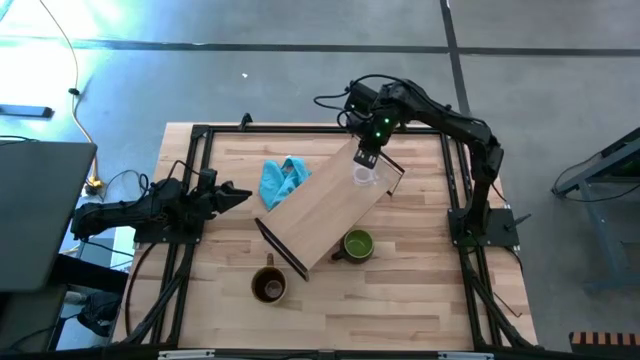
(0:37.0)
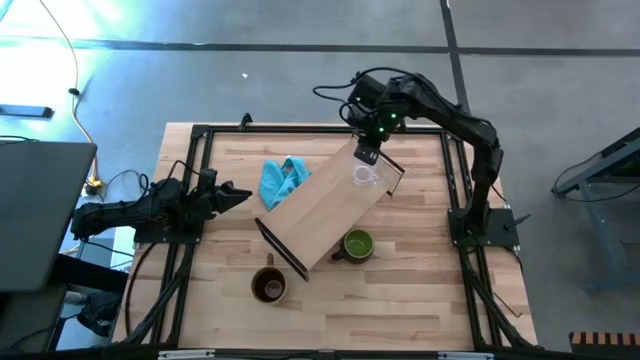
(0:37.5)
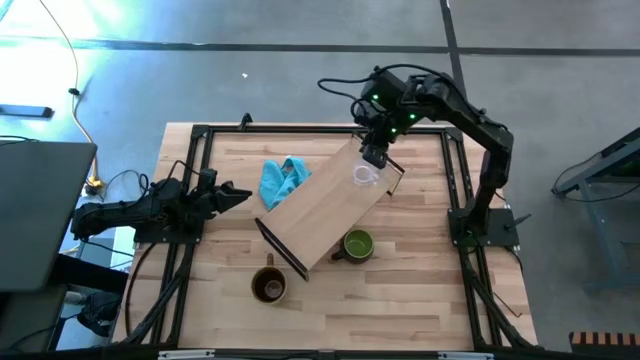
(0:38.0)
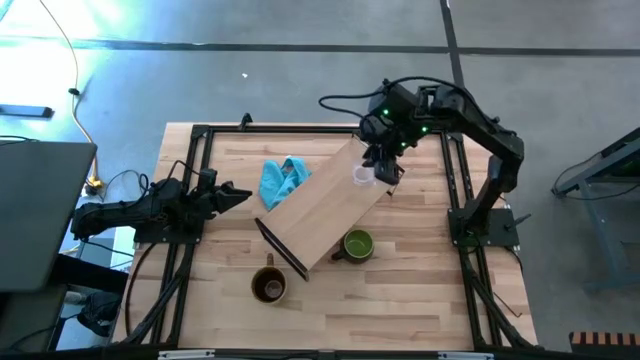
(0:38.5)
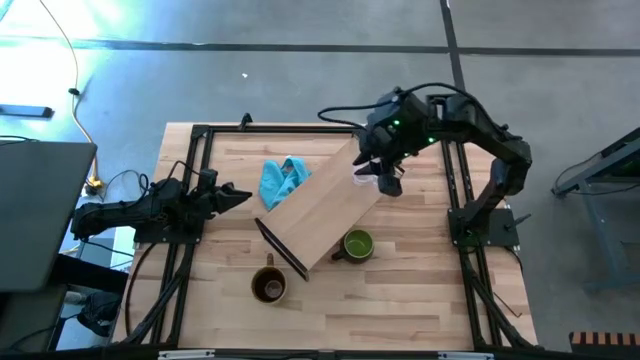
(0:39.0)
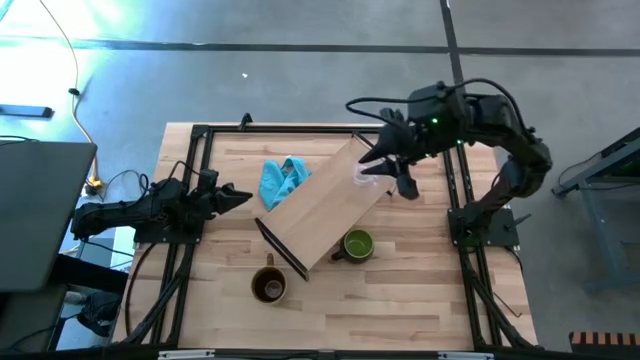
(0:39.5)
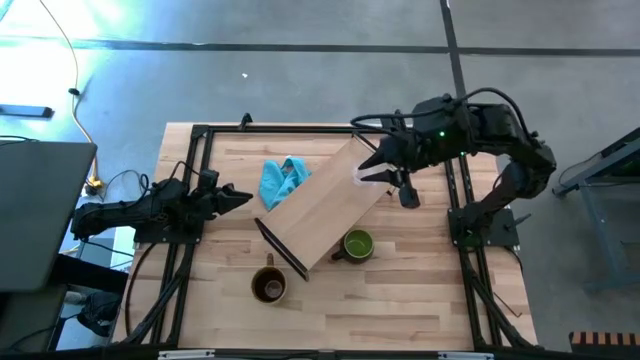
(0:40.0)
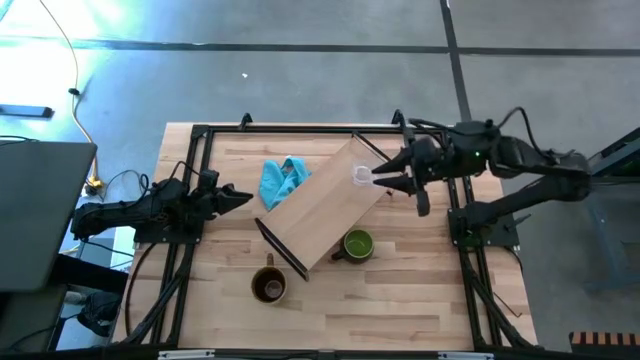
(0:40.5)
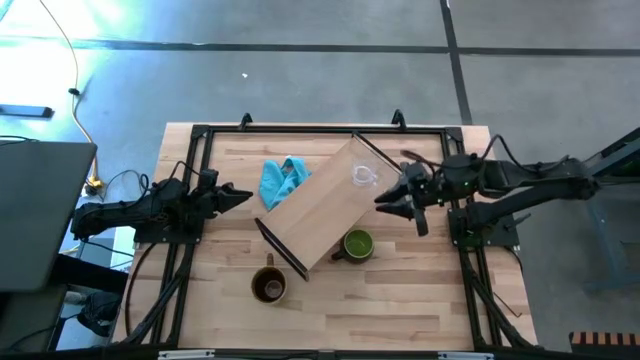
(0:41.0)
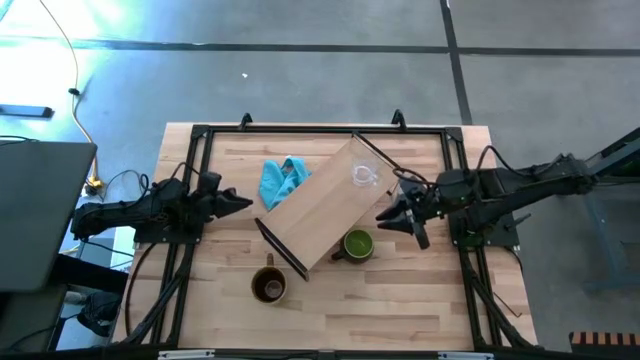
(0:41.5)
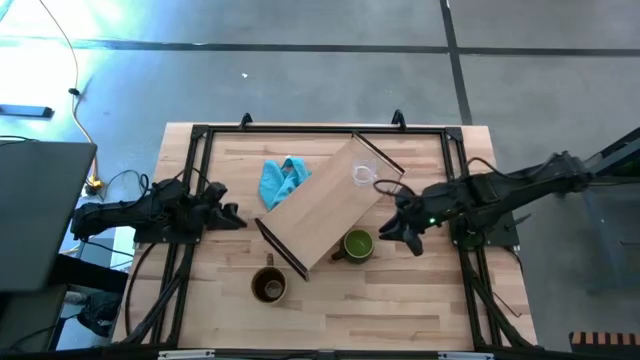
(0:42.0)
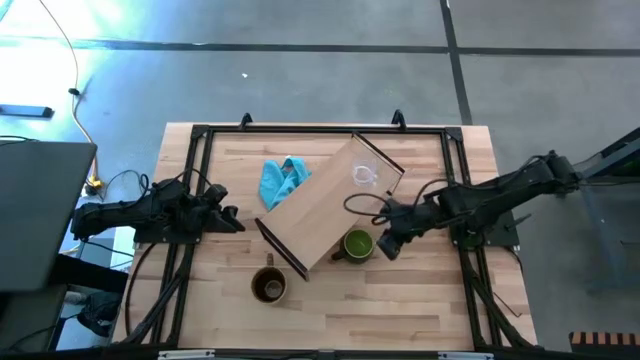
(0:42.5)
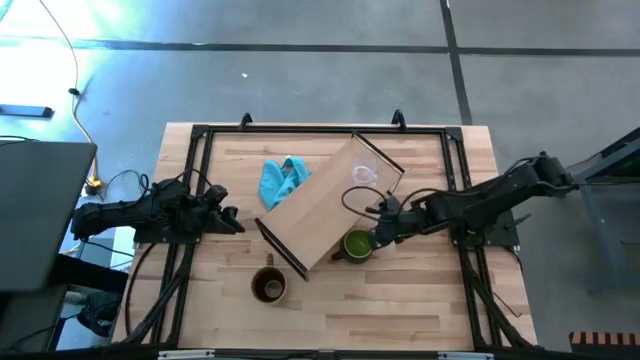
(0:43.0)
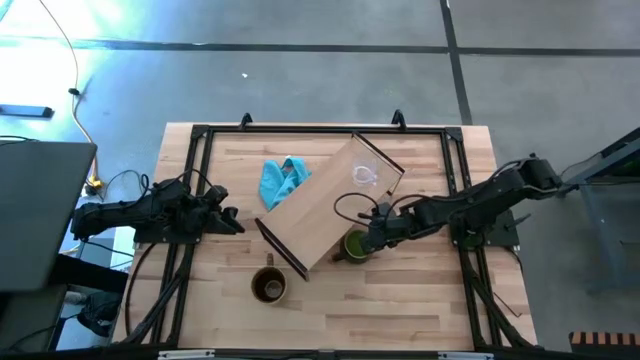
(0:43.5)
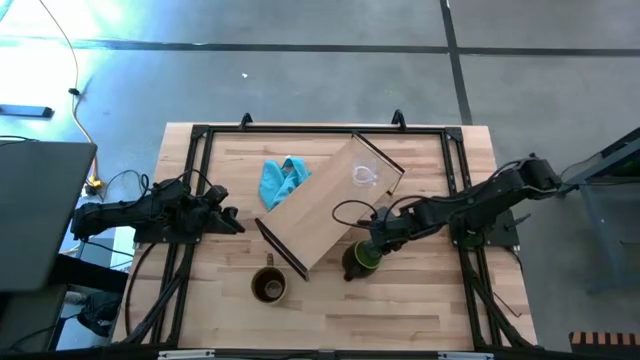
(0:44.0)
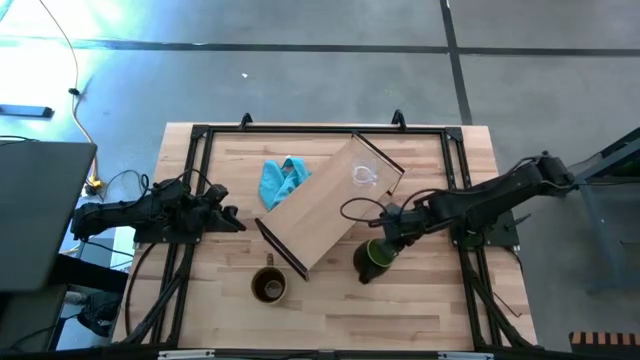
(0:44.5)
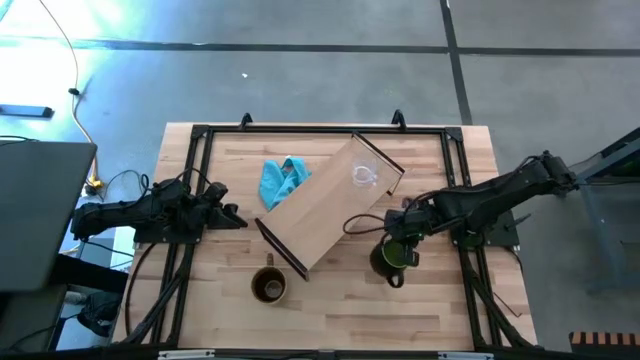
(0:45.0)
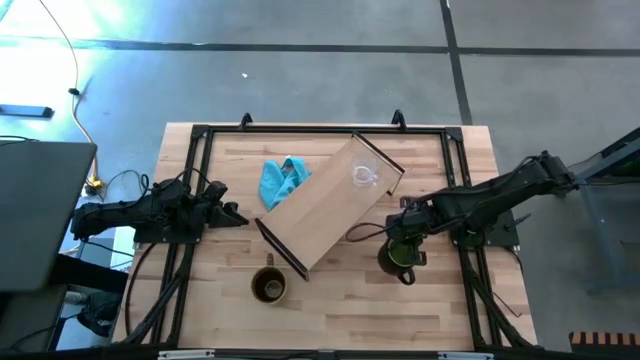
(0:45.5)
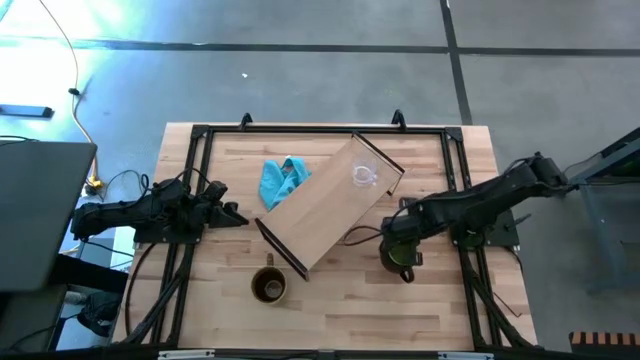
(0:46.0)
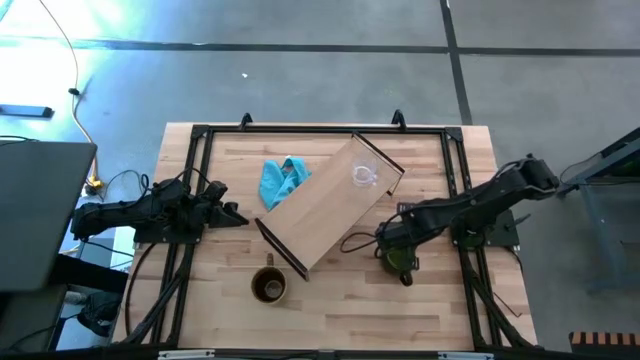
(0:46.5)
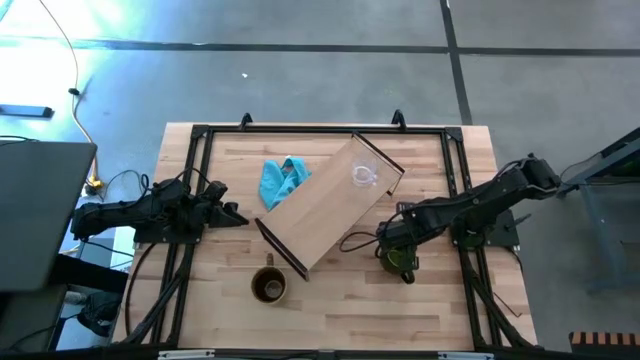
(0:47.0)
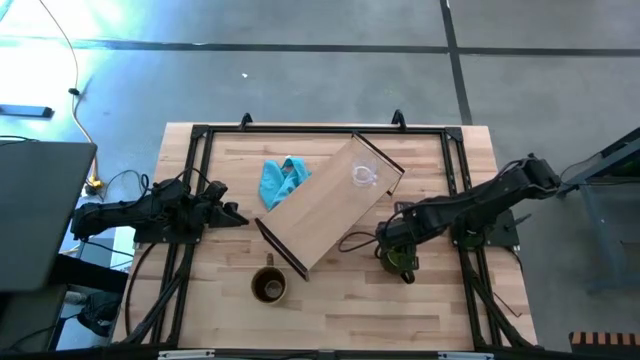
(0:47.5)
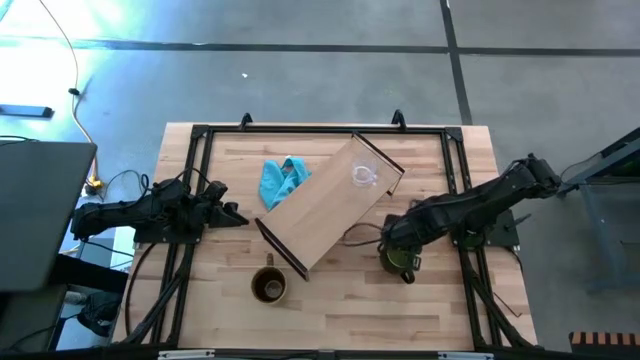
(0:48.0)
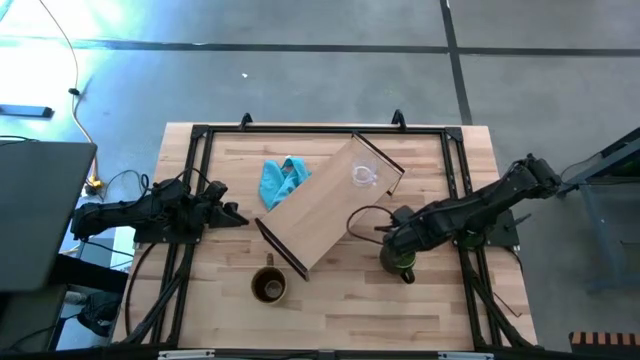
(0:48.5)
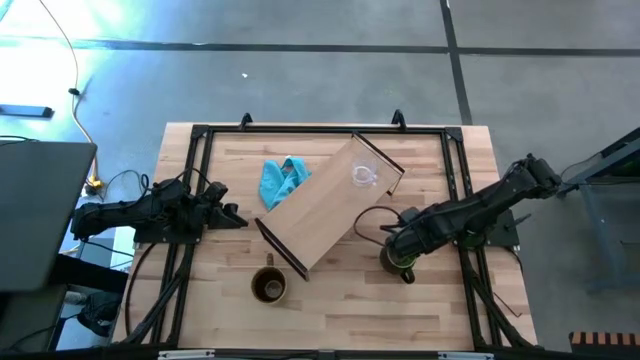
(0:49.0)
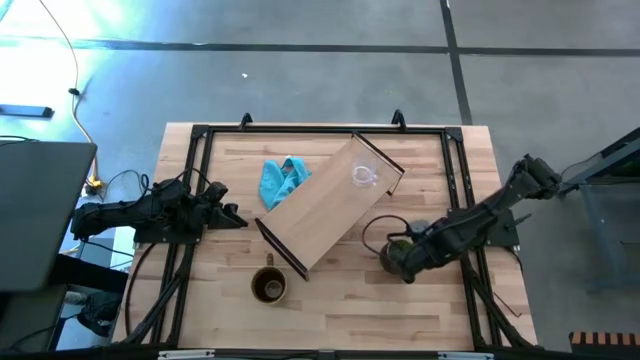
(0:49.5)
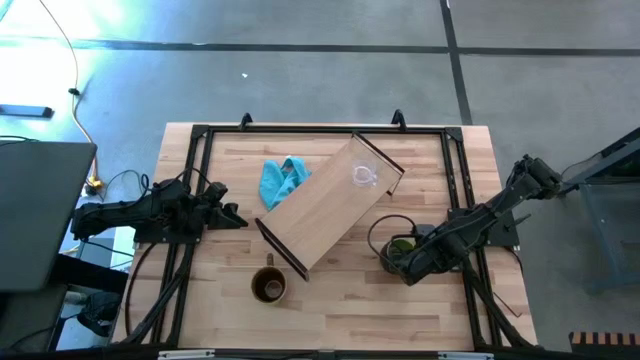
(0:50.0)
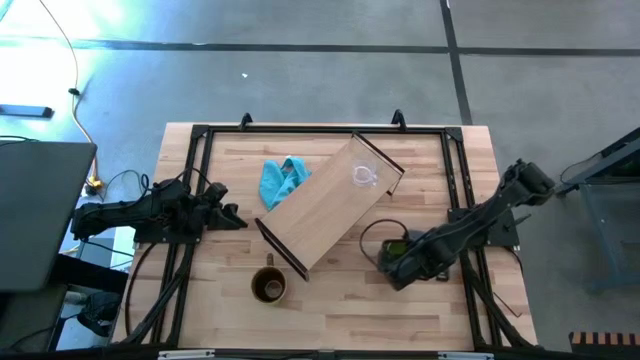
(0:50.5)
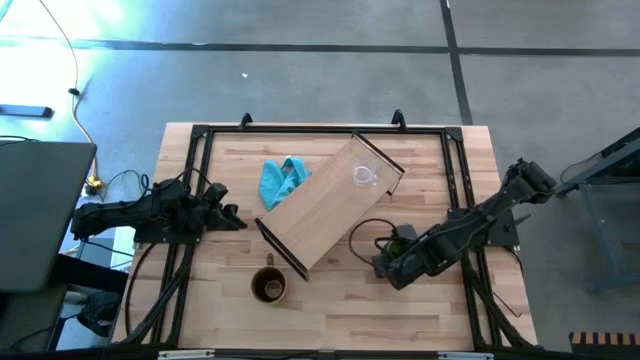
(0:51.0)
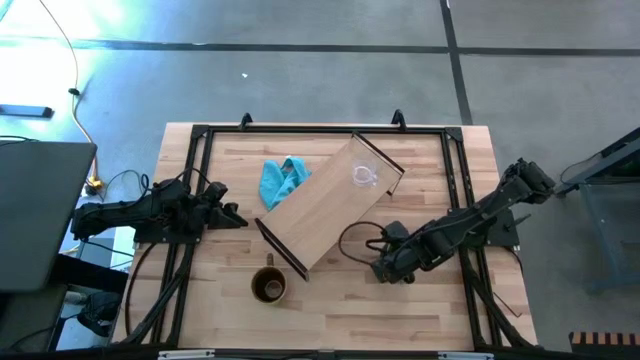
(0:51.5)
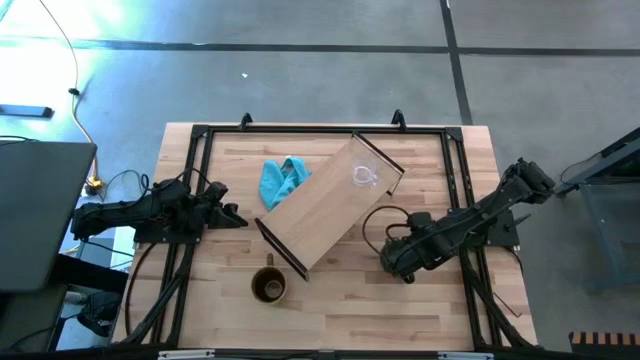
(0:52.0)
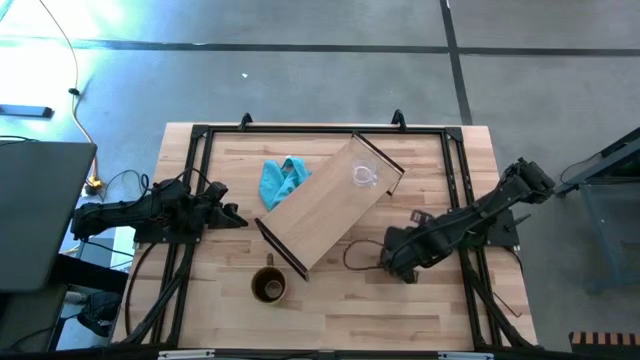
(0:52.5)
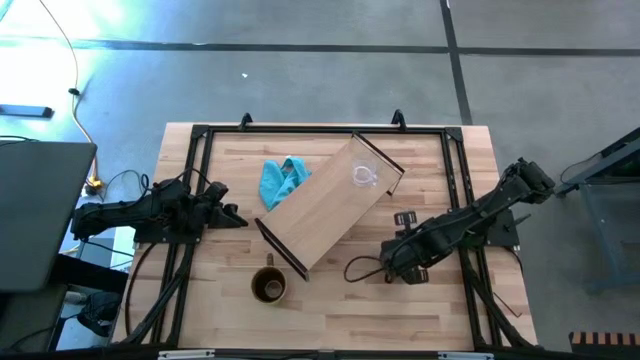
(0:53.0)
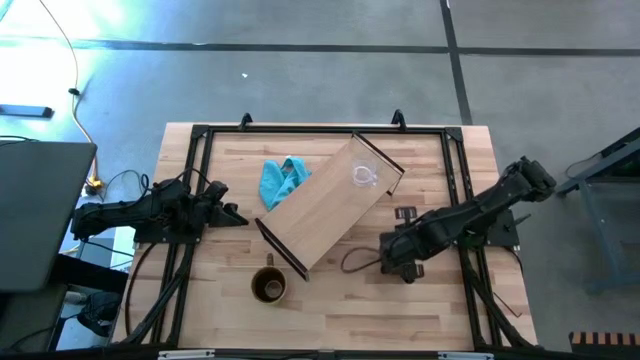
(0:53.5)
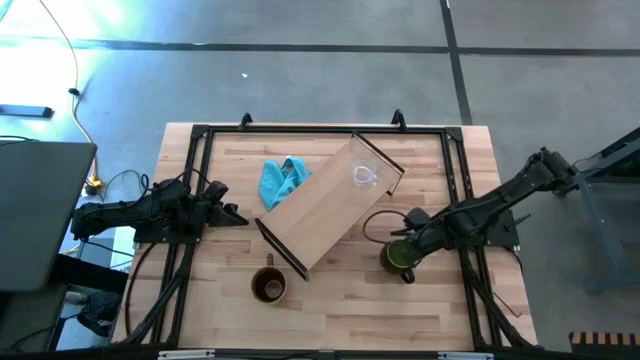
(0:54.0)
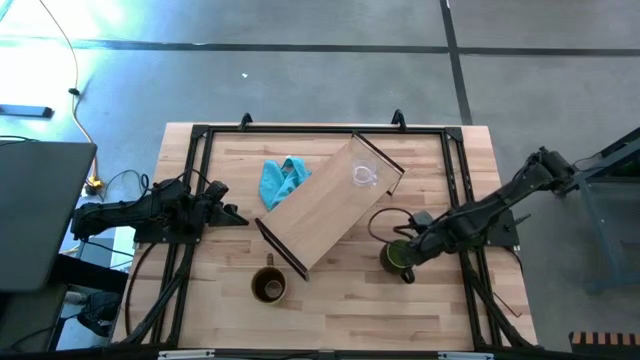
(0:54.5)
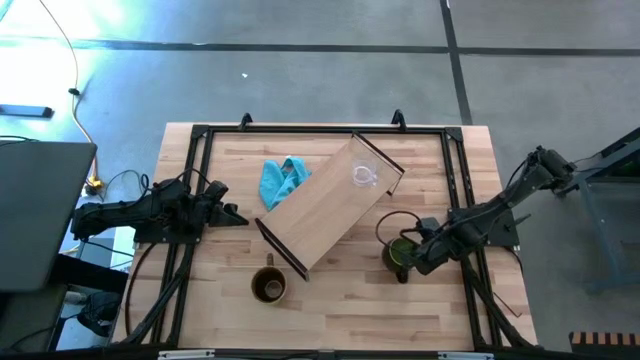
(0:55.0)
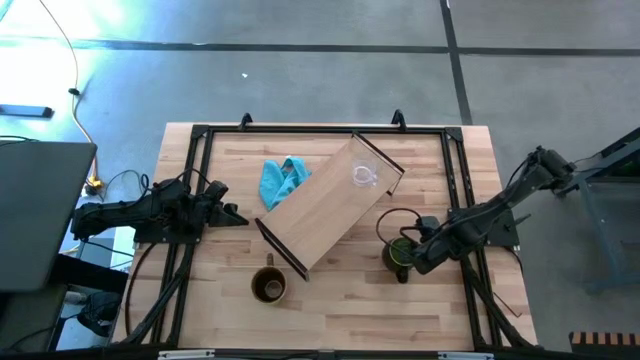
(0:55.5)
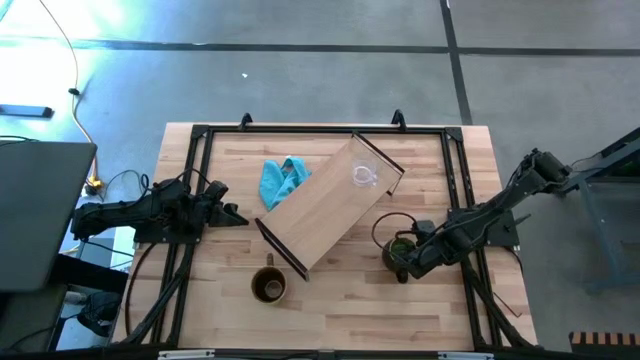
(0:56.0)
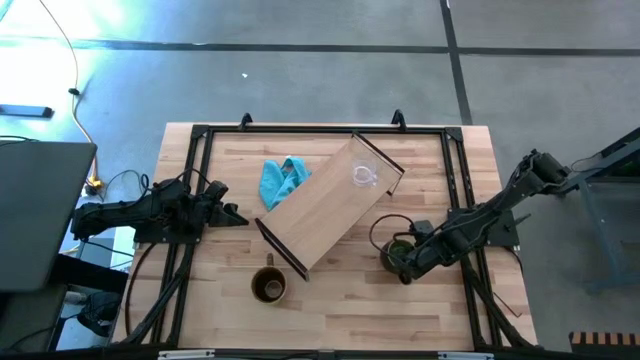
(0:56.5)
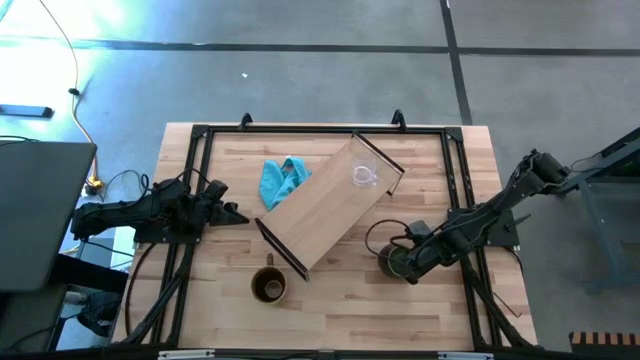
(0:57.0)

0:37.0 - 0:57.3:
Task: Stack small to large cups/mugs on shelf
Put the black mug on the shelf
